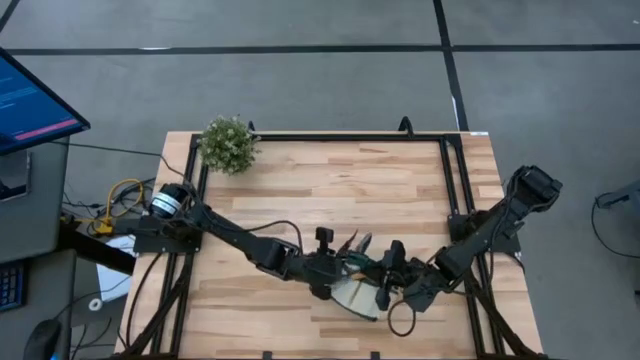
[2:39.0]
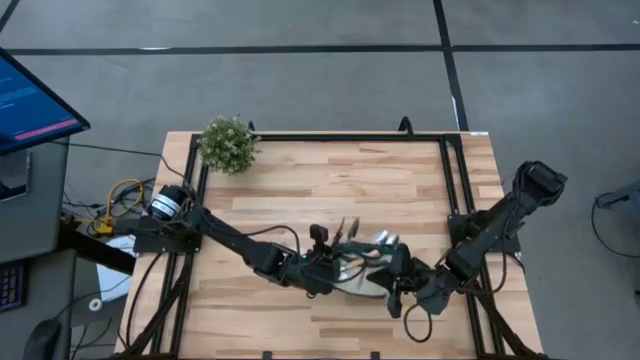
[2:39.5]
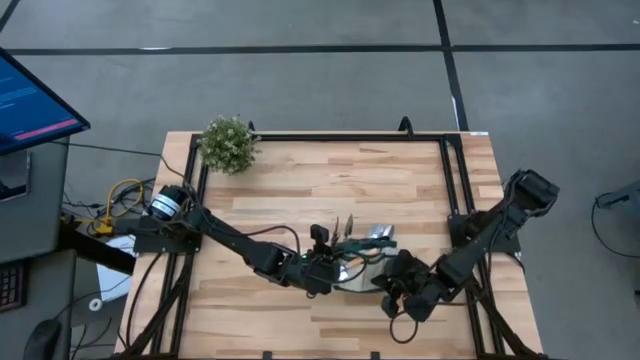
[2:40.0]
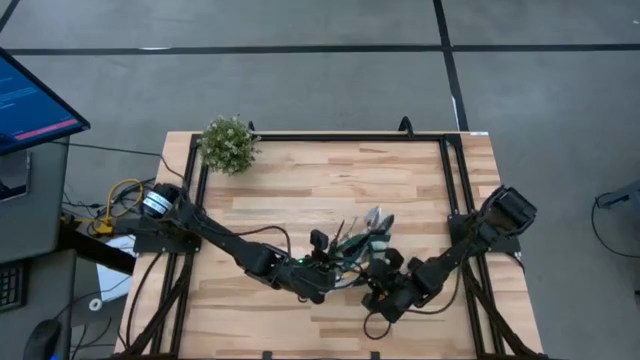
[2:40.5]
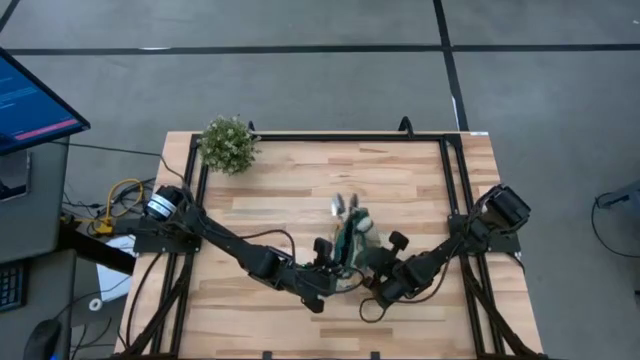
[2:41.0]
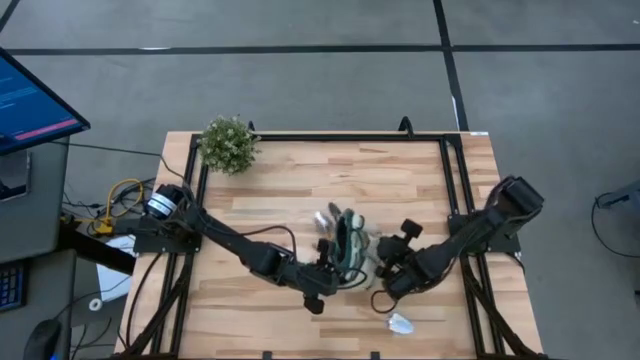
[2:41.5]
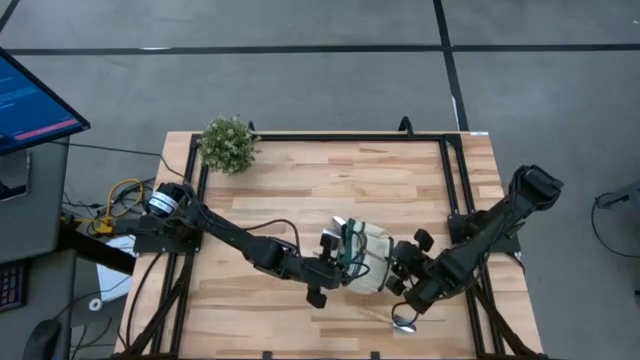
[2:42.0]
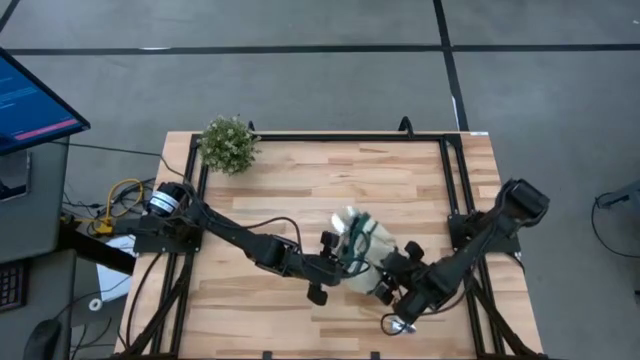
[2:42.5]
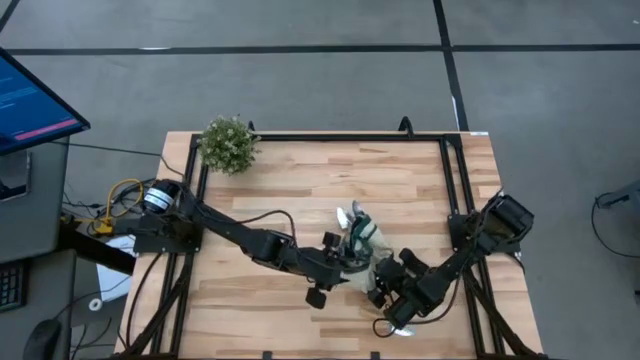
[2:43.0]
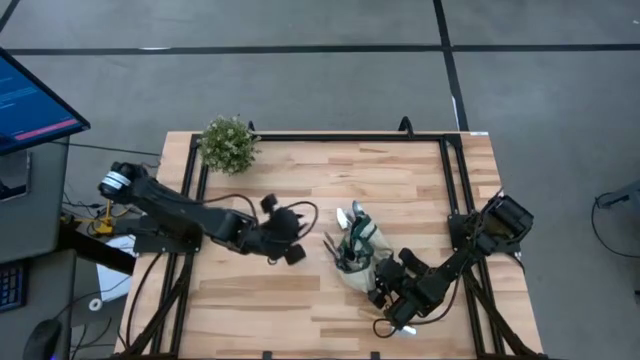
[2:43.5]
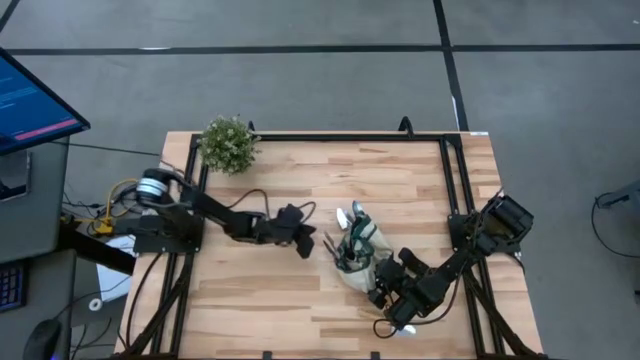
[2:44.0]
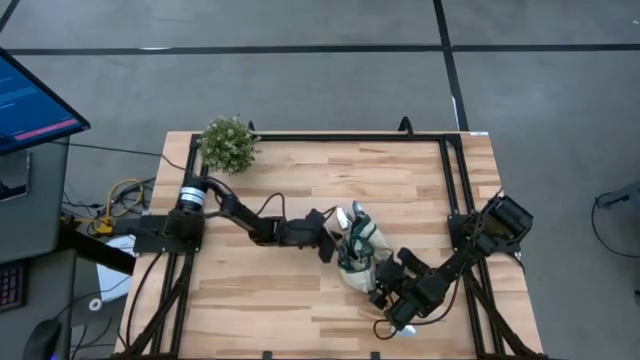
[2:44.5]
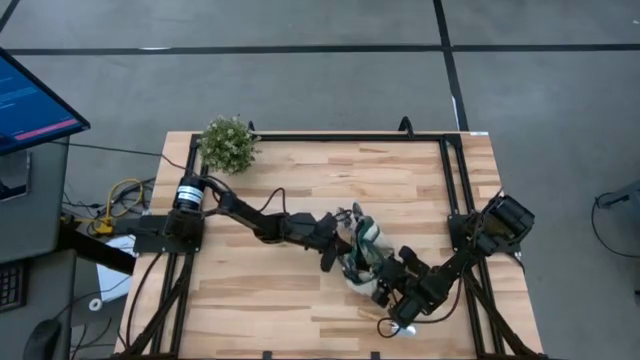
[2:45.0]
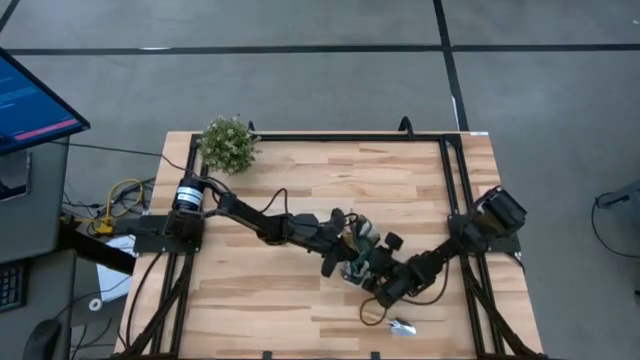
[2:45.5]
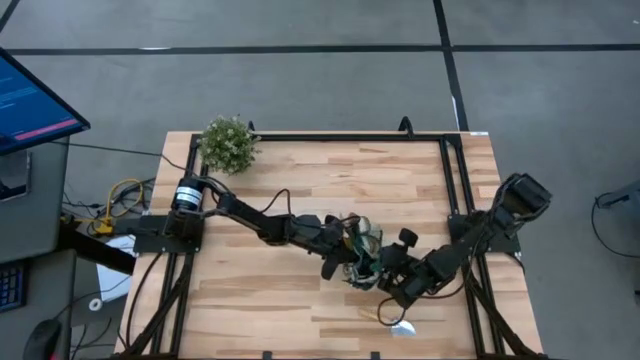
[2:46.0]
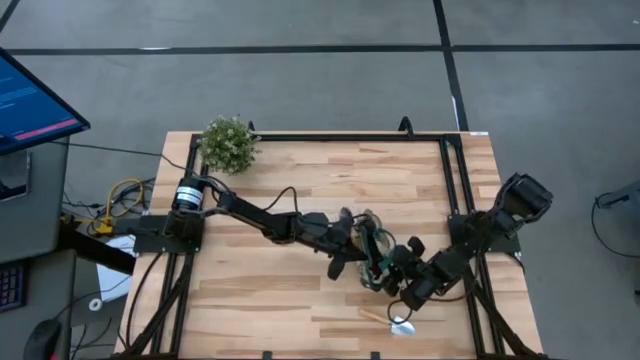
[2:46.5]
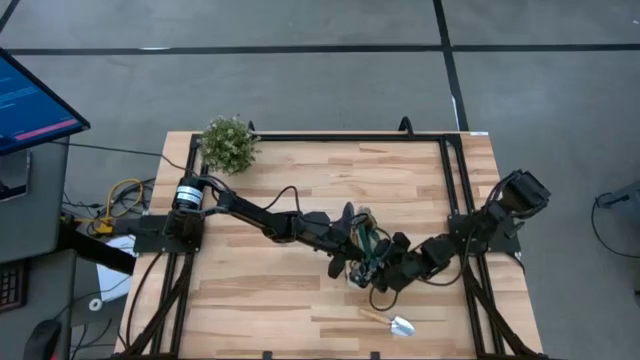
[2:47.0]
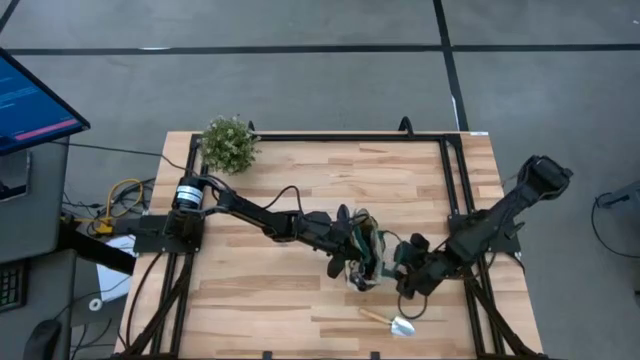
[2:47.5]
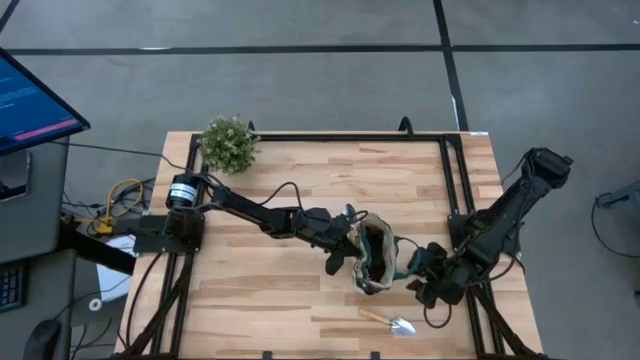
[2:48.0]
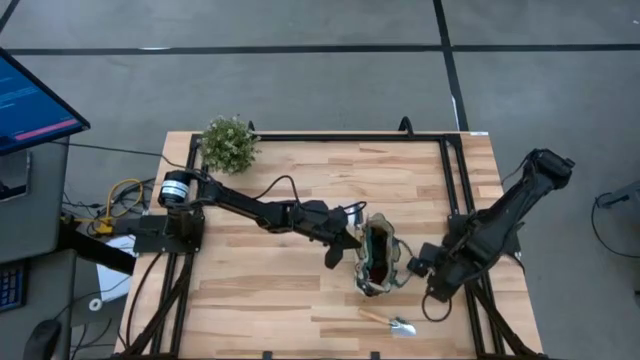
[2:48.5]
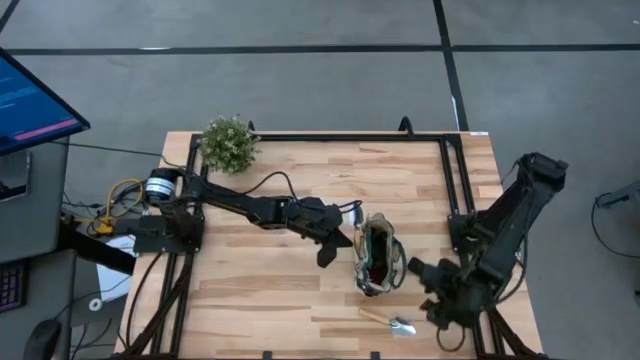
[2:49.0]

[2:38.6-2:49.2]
Task: Pick & Place Garden tools in Gardening bag
Adjust the gardening bag

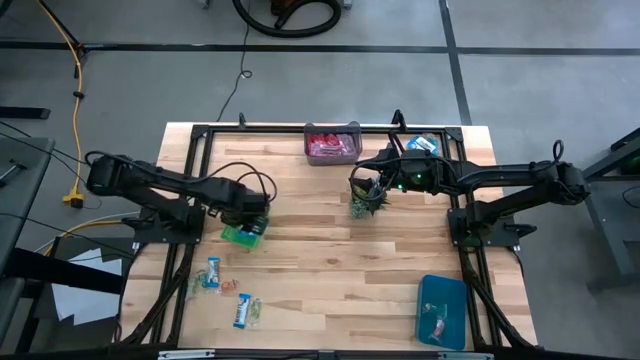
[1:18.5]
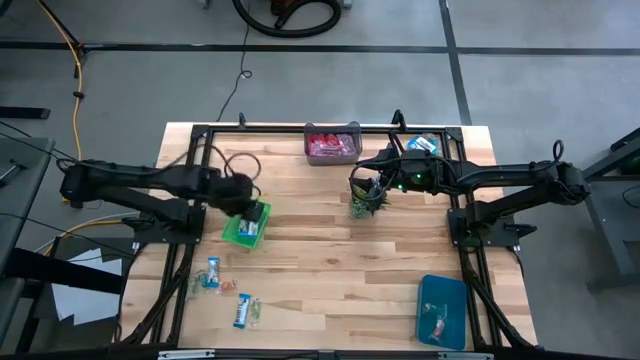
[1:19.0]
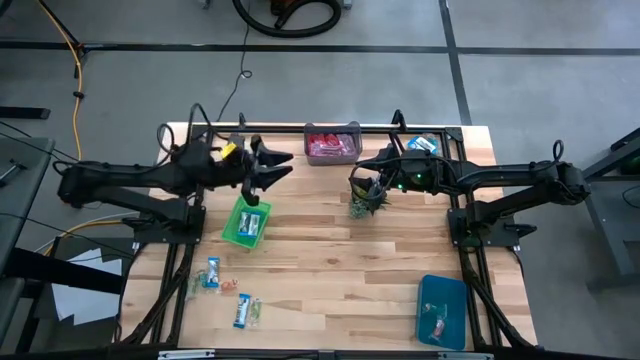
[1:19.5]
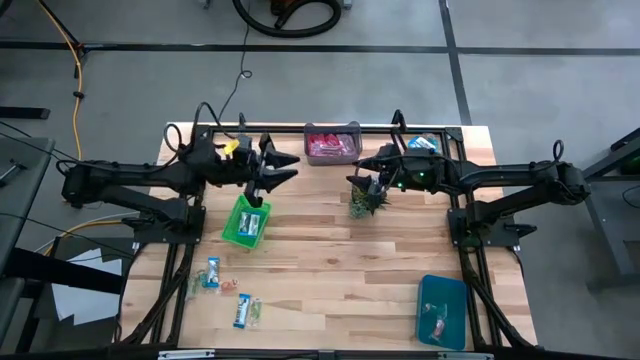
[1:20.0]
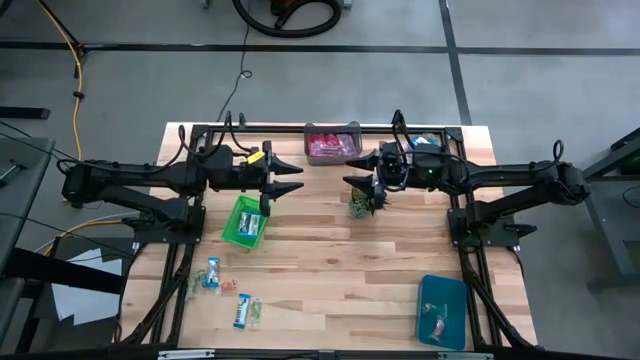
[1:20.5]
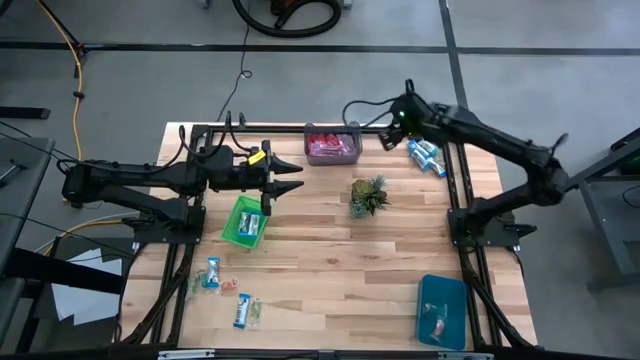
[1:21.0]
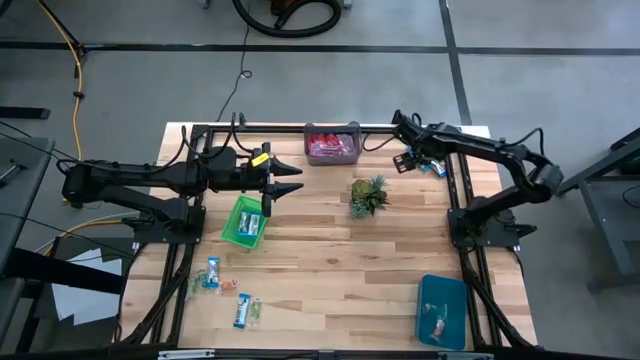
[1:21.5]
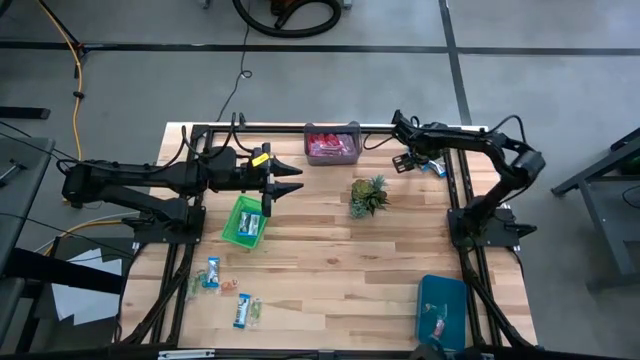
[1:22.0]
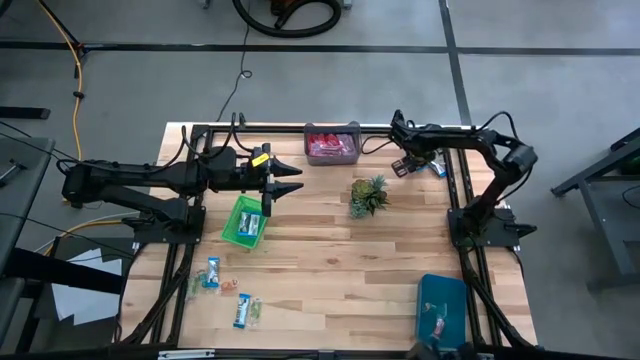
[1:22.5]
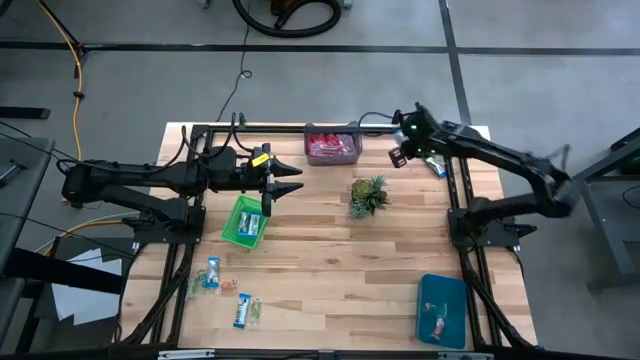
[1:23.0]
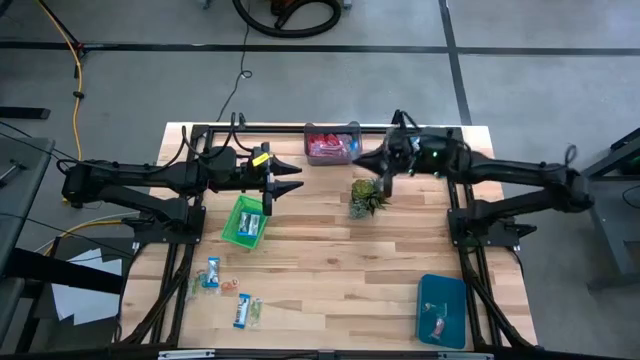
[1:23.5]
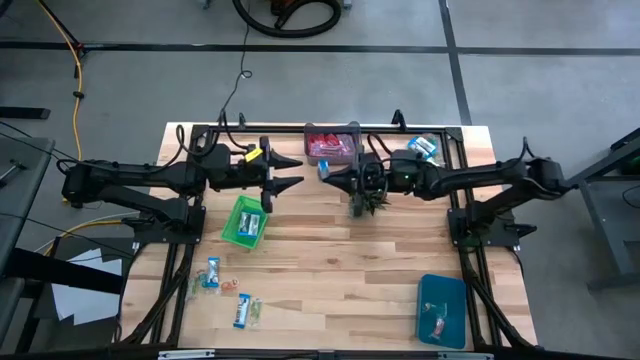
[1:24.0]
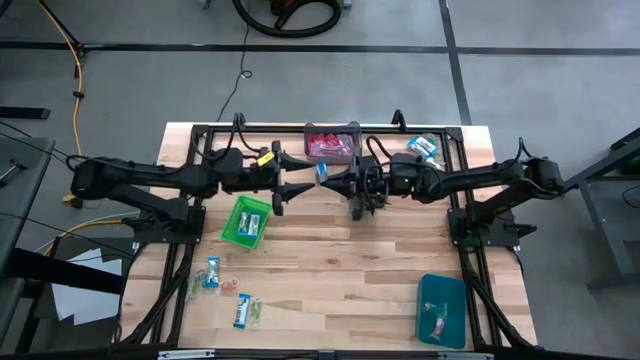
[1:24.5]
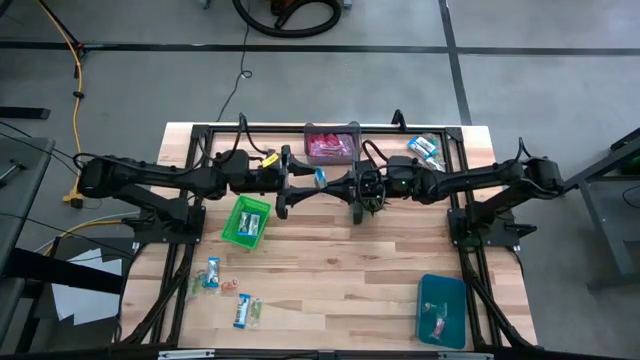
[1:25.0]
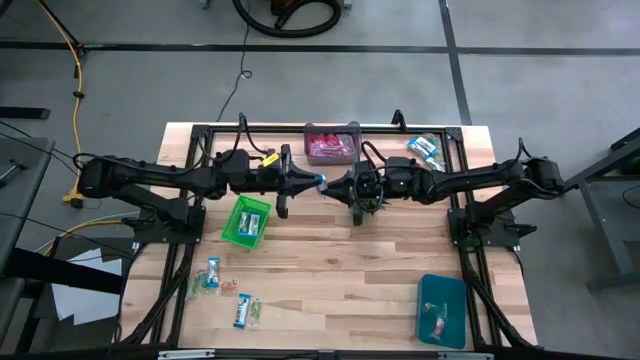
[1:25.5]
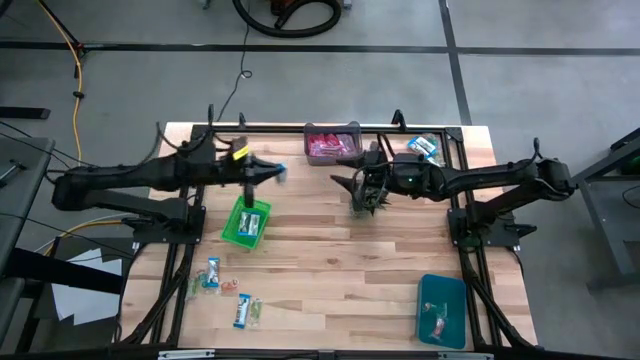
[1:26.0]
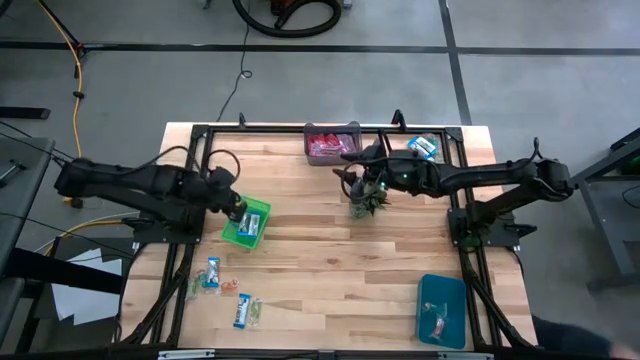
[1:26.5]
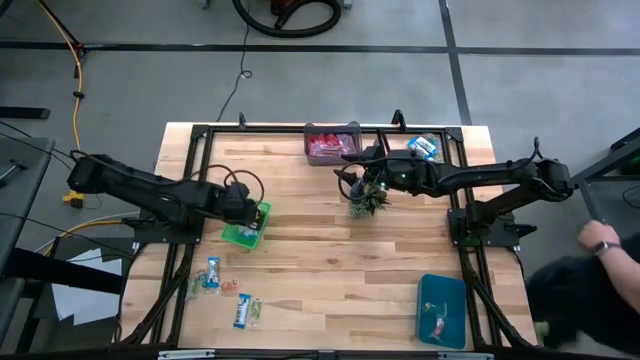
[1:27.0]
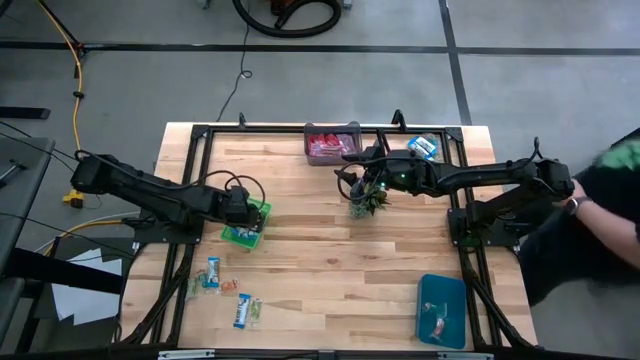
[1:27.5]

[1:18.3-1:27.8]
Task: Sort candy
Put the white candy into the green bin
